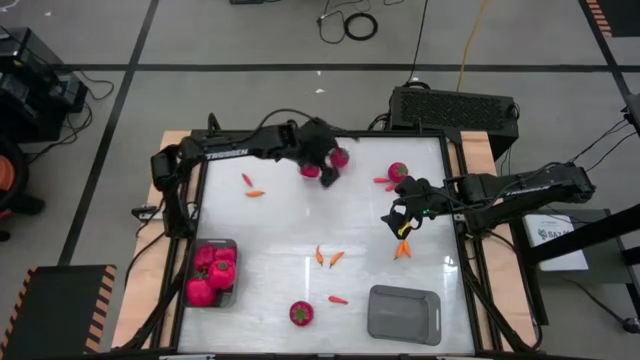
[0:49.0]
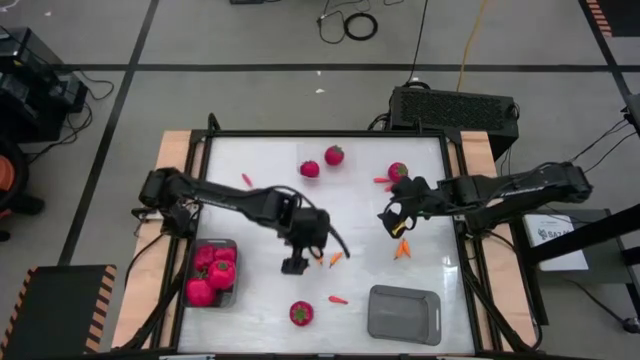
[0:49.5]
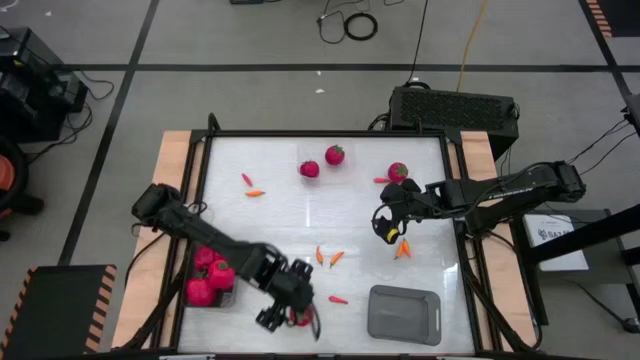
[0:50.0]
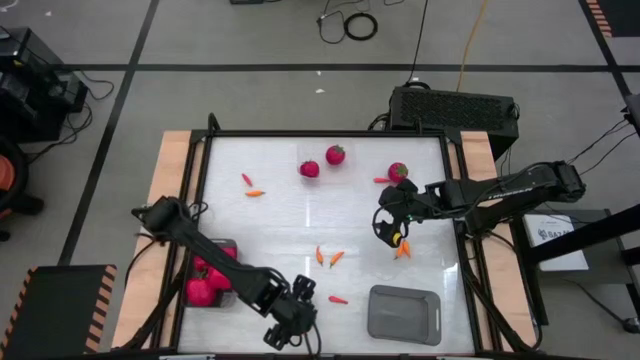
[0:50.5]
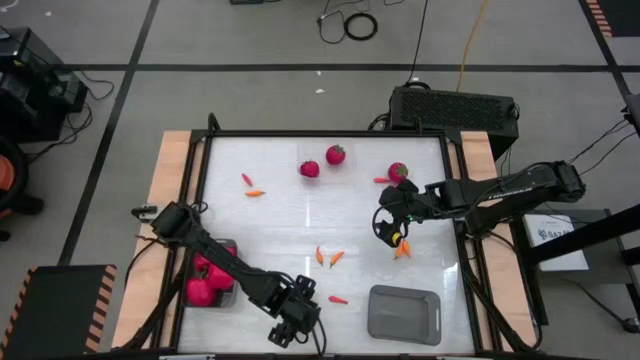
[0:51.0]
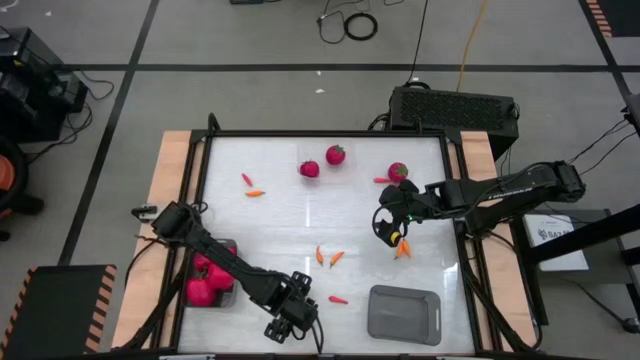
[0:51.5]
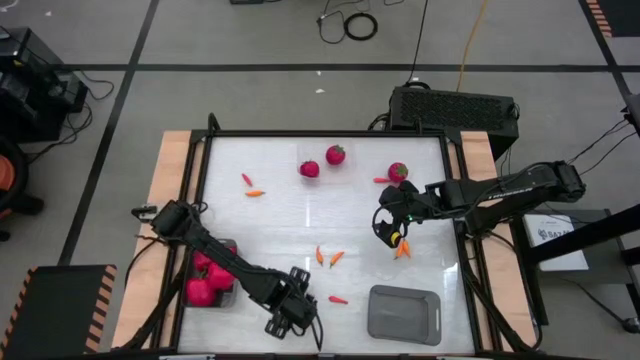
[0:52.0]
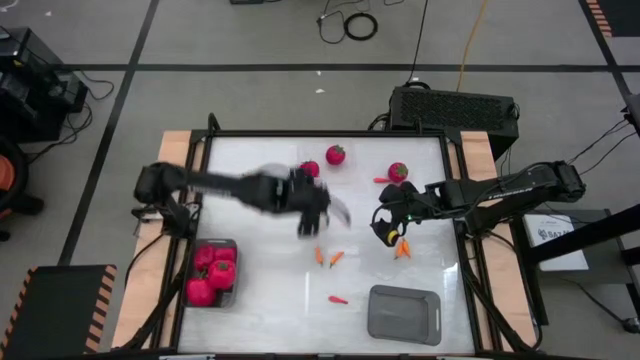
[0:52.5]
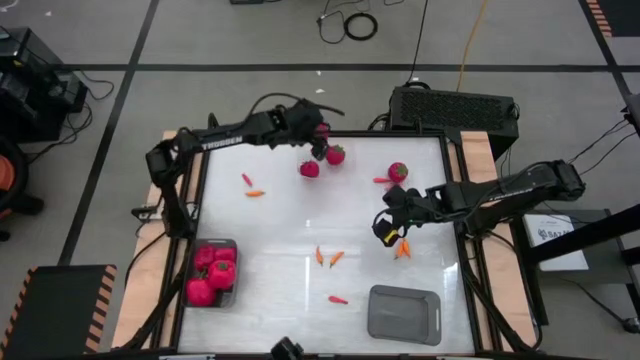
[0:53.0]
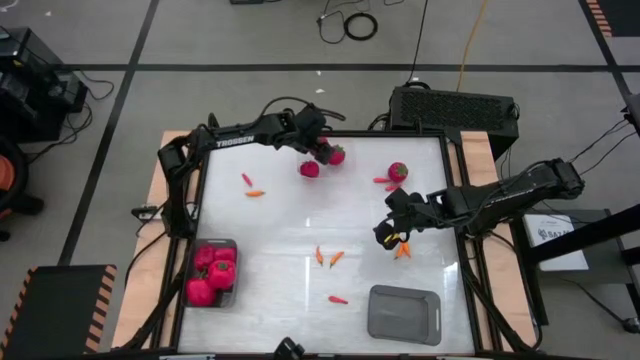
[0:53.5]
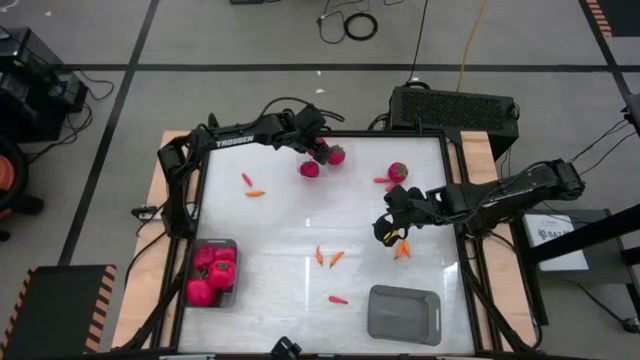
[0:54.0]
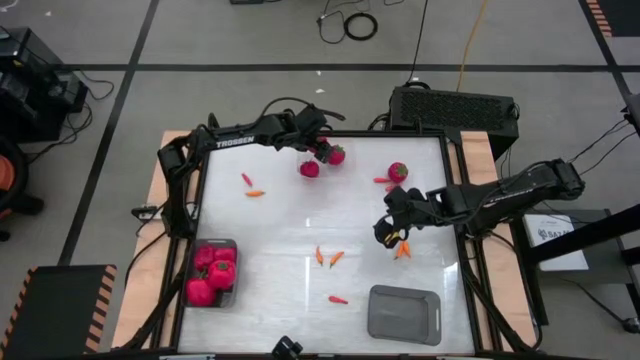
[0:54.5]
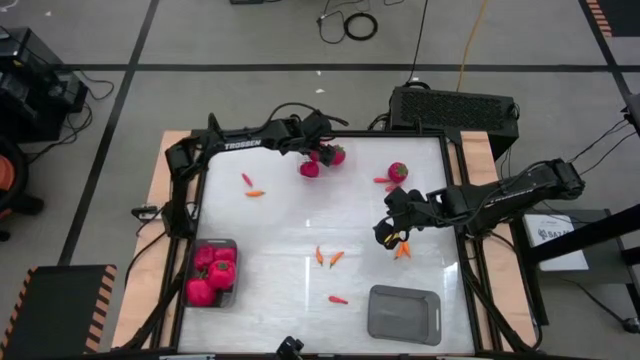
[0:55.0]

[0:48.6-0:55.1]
Task: Sort produce into baskets
Put the tomato into the transparent bin

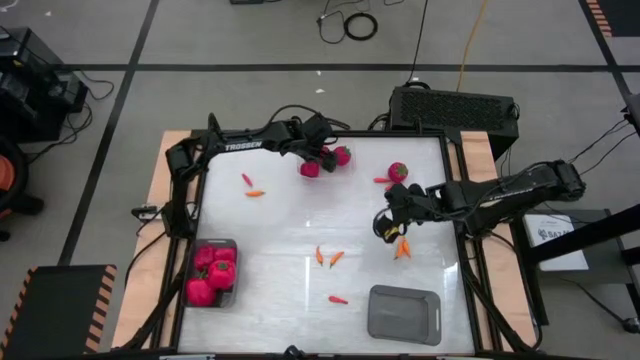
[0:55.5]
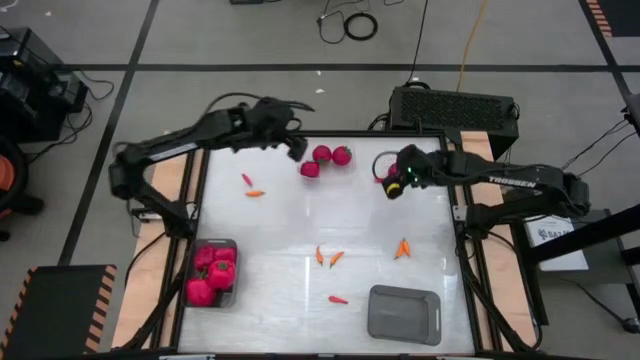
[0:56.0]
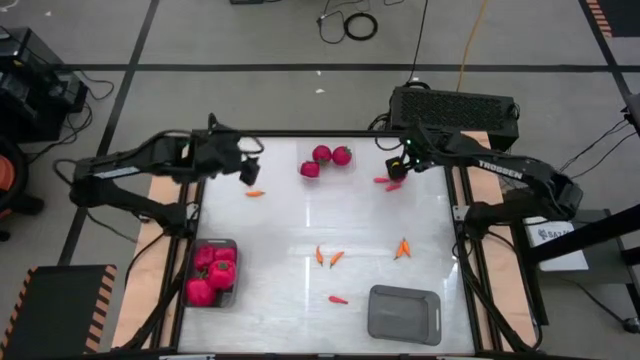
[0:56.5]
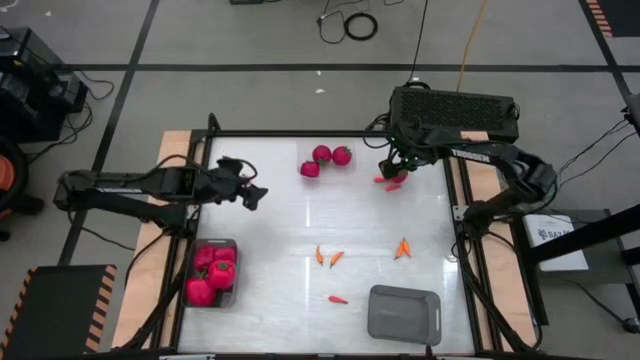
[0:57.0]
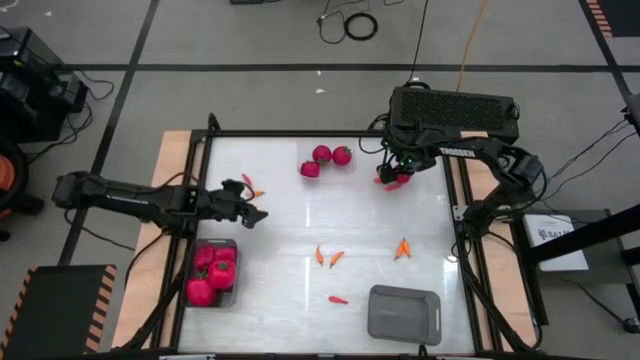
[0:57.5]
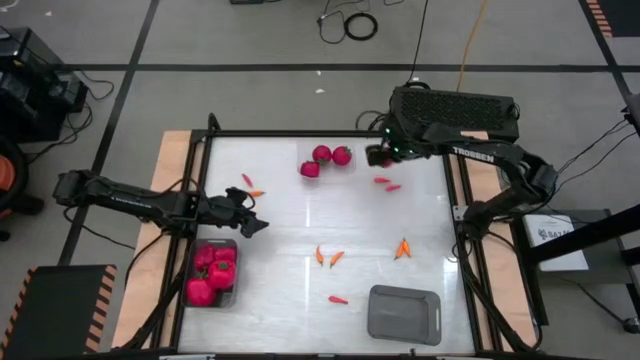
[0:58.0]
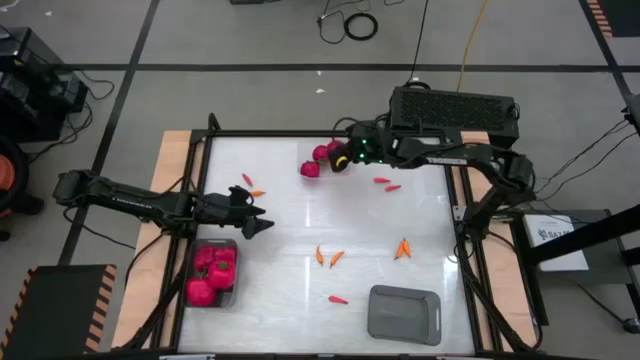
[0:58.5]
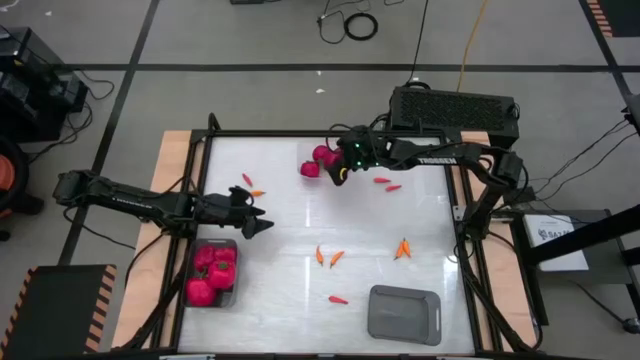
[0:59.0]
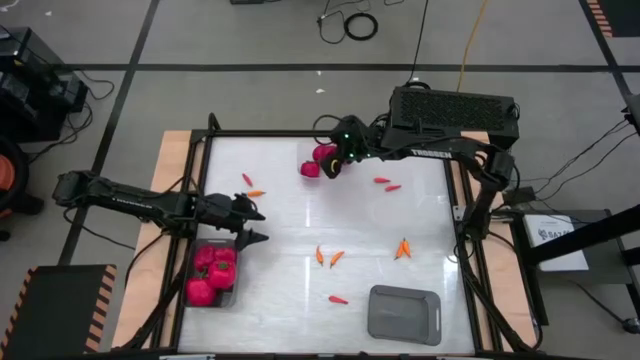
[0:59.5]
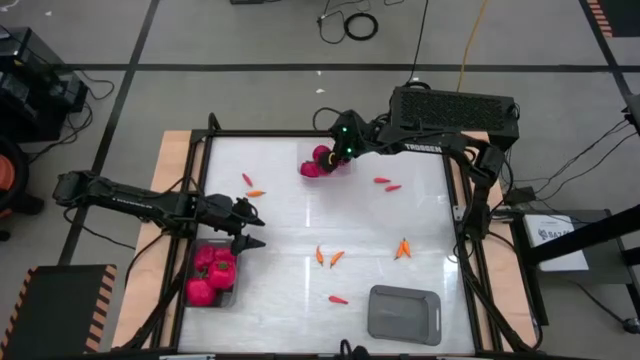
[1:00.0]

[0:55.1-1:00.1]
Put the tomato into the transparent bin

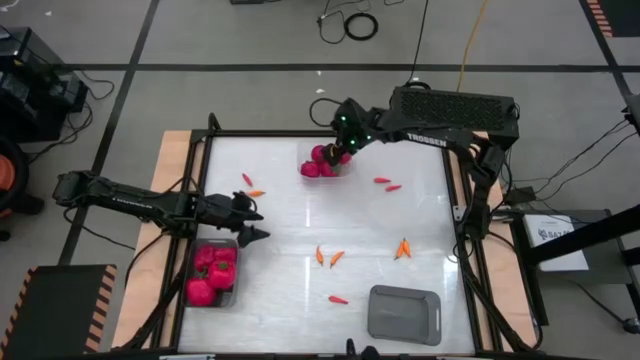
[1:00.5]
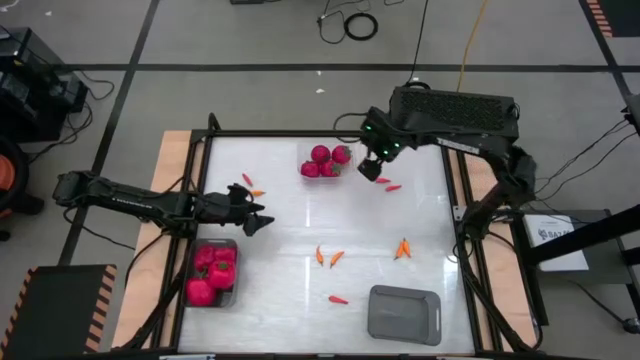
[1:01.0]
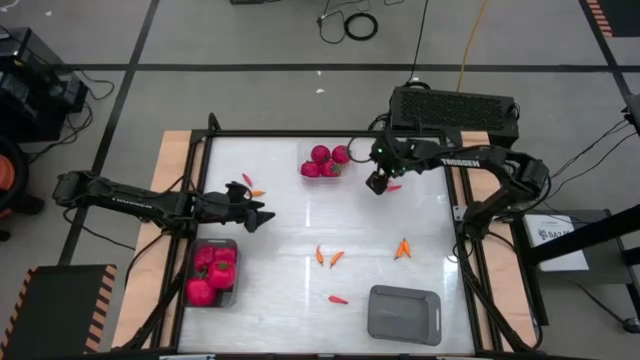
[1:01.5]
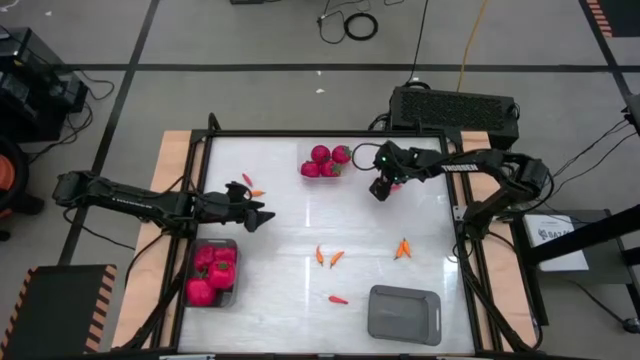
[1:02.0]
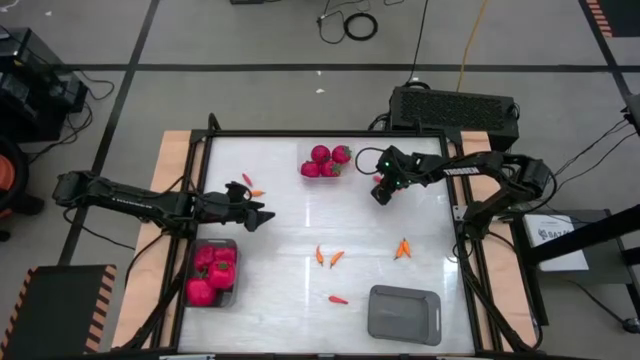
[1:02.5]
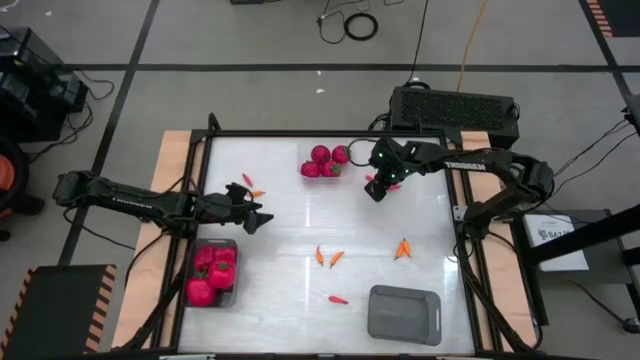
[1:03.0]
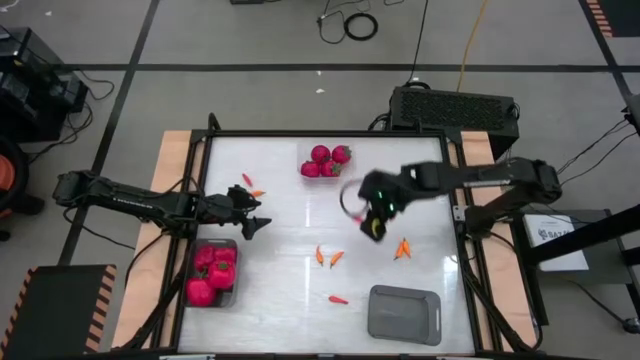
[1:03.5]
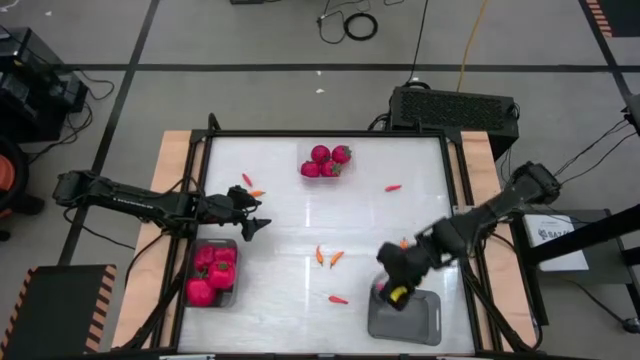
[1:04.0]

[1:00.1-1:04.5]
Put the red chili pepper into the right black bin

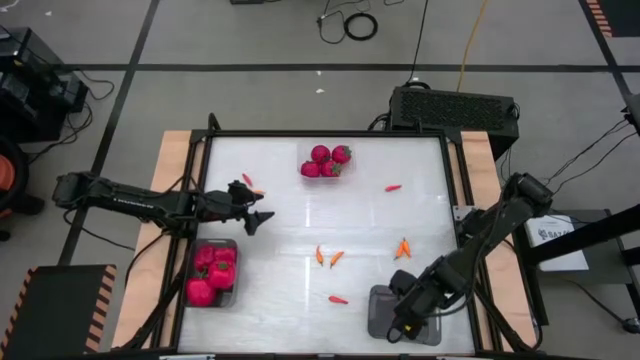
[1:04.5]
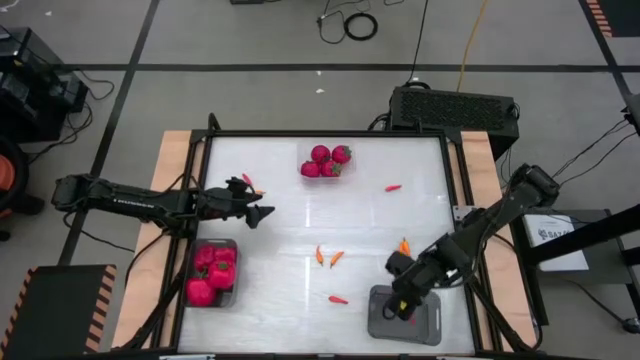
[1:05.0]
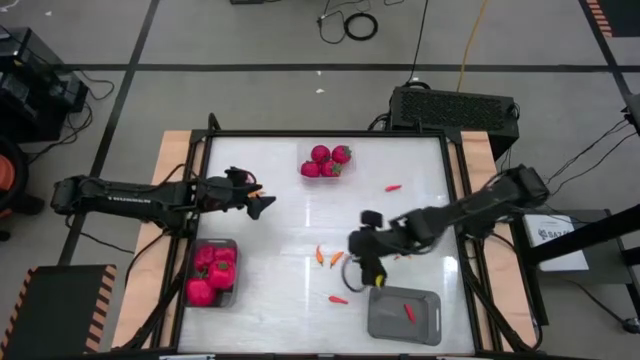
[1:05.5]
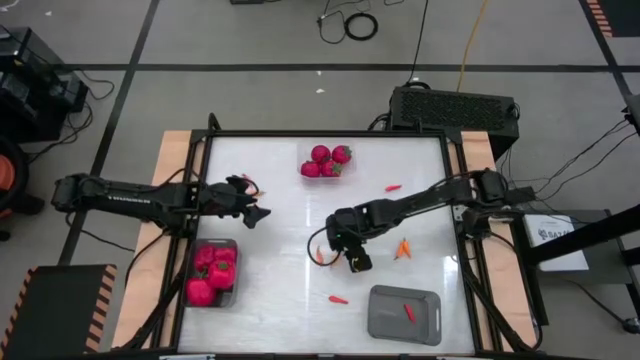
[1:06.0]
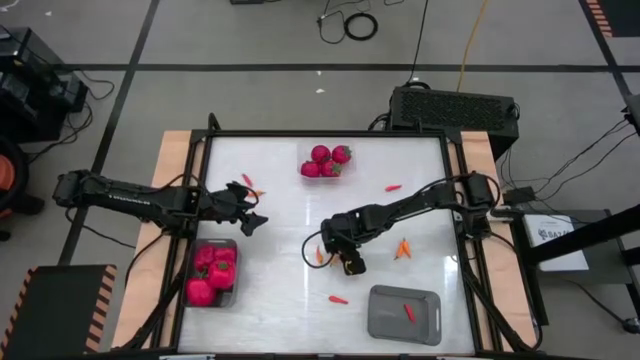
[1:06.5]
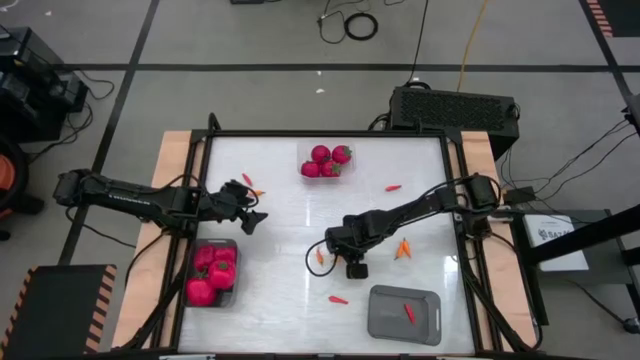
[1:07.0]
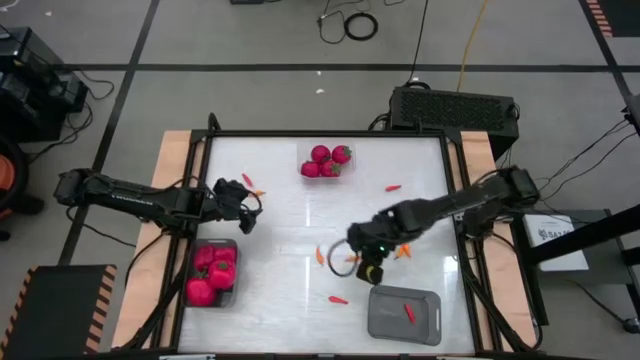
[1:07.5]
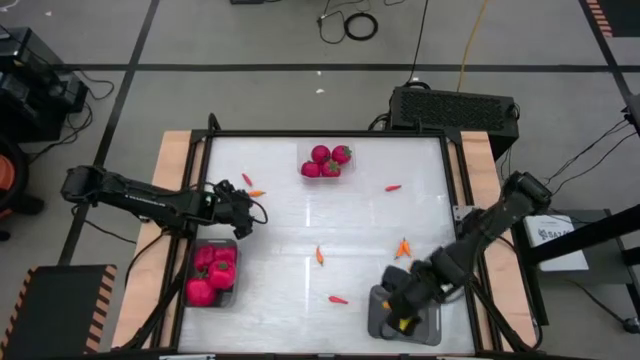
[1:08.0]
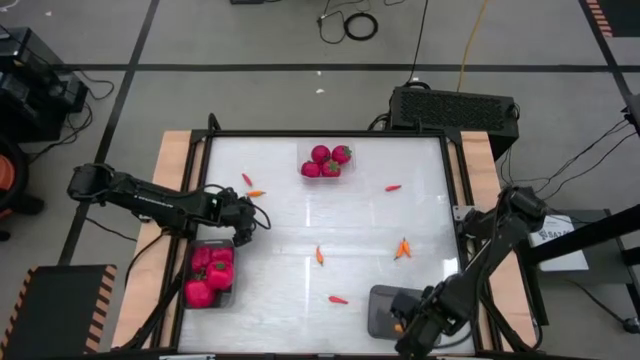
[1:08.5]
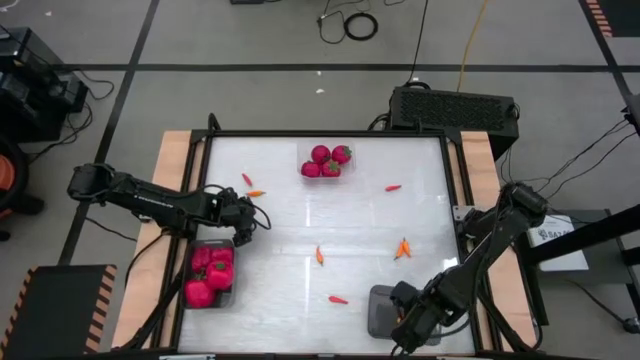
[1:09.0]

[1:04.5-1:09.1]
Put the orange chili pepper into the right black bin

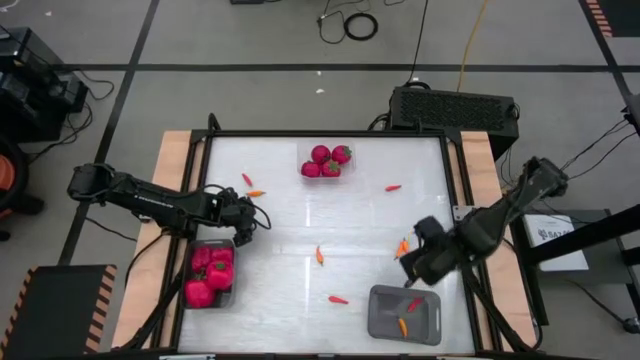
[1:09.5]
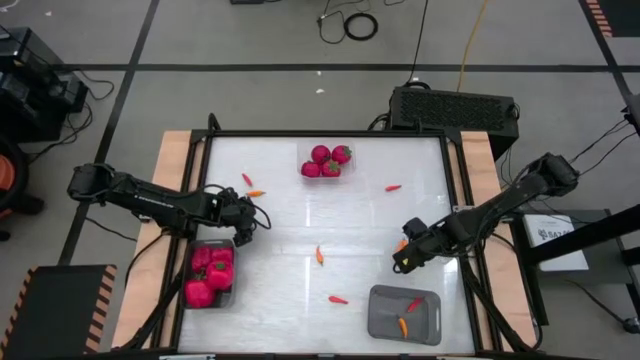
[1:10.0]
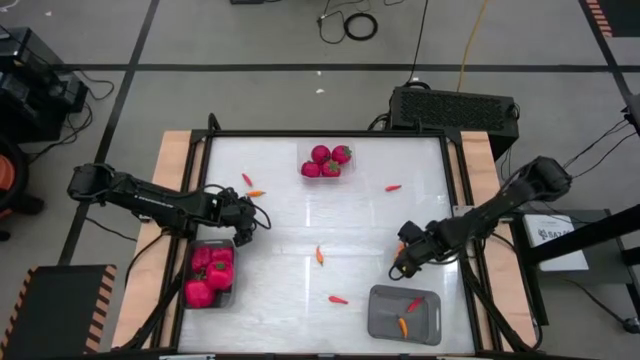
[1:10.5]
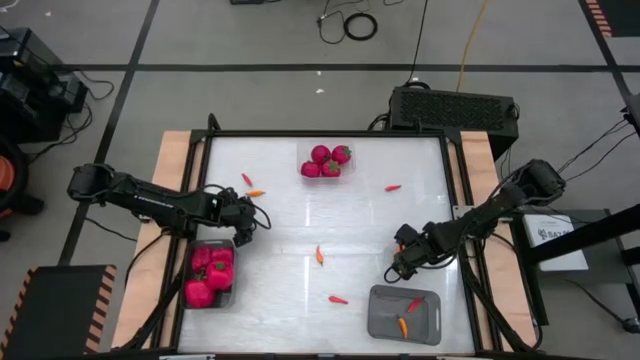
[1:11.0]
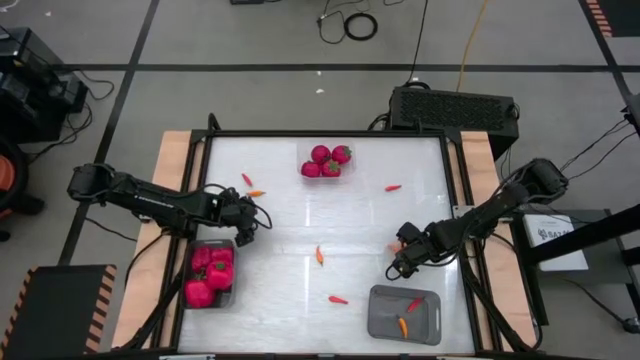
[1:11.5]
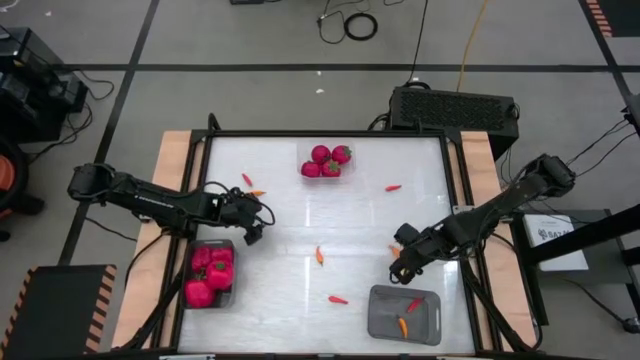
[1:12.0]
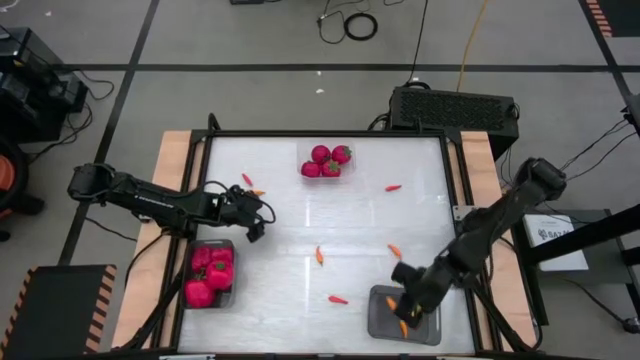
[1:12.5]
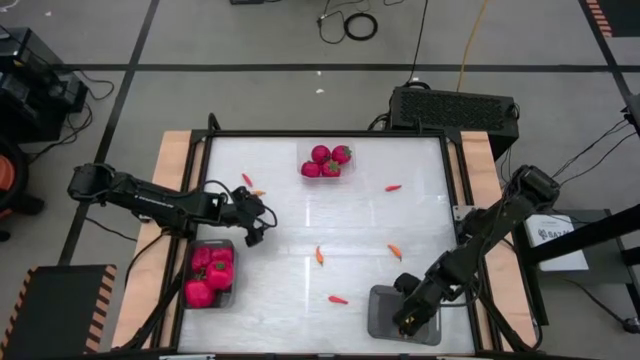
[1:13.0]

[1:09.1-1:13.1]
Put the orange chili pepper into the right black bin
